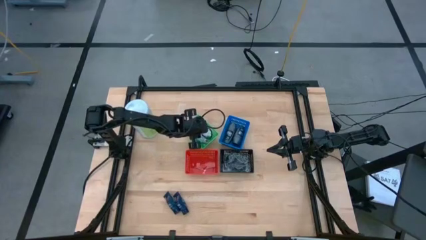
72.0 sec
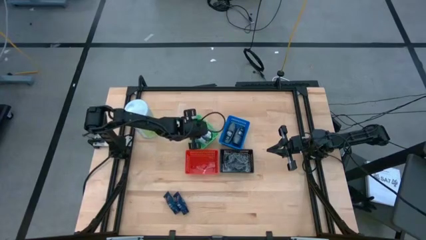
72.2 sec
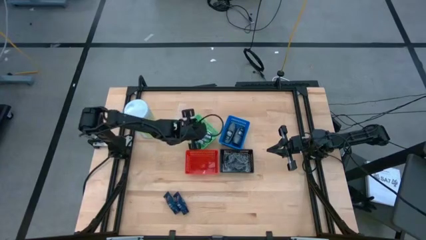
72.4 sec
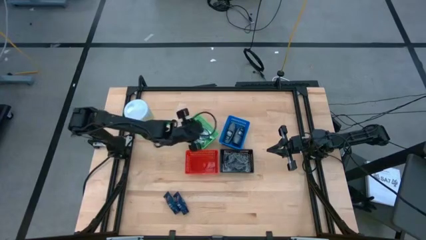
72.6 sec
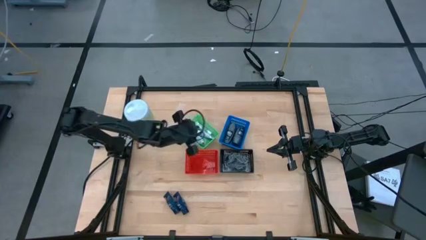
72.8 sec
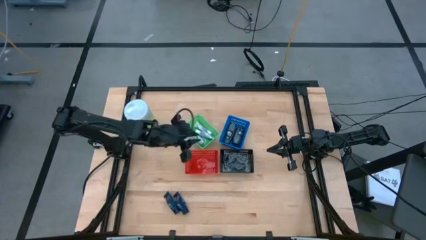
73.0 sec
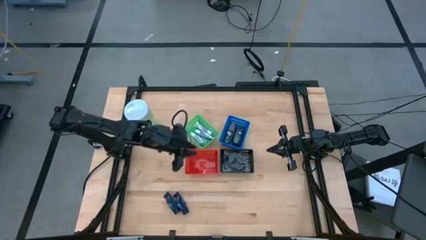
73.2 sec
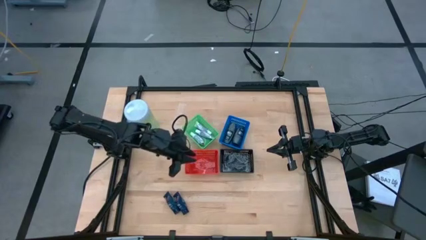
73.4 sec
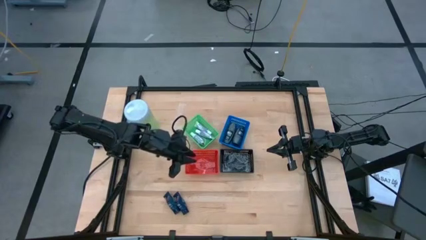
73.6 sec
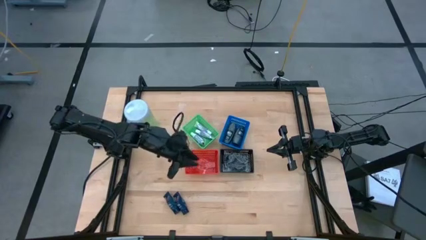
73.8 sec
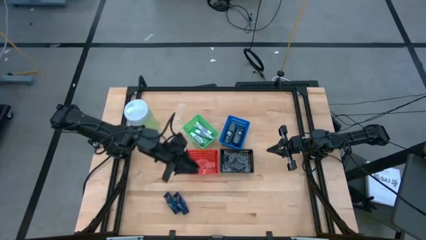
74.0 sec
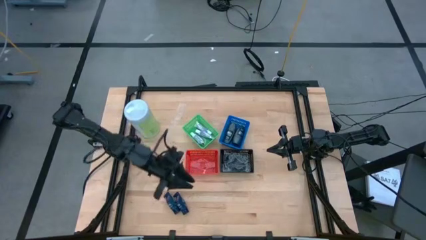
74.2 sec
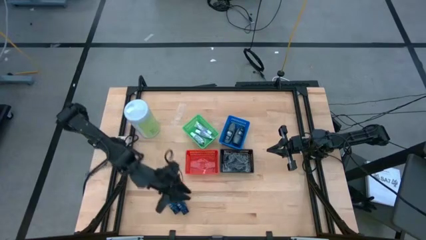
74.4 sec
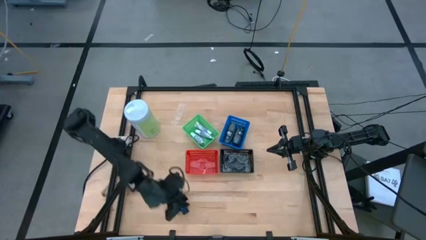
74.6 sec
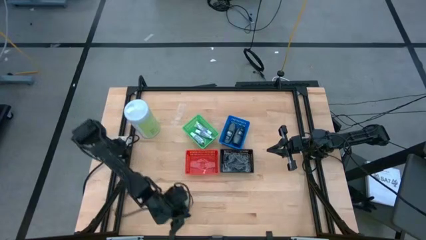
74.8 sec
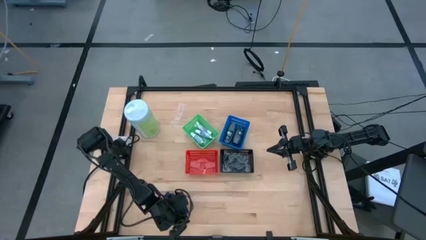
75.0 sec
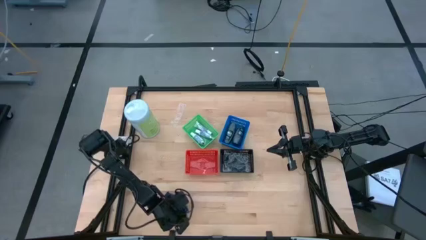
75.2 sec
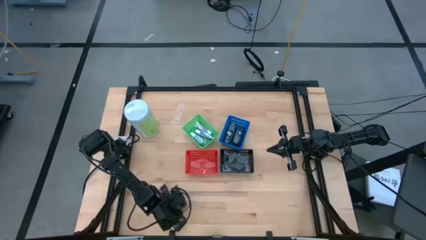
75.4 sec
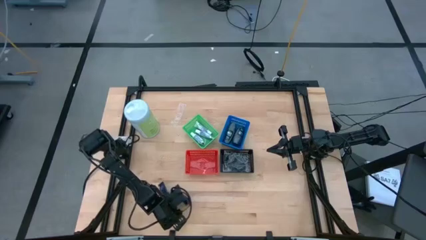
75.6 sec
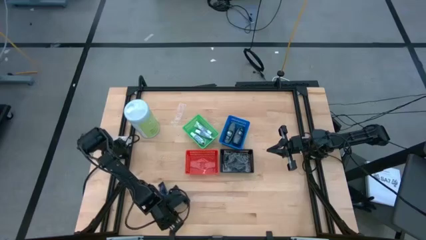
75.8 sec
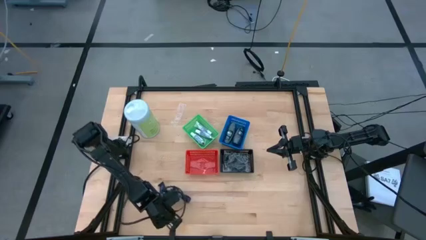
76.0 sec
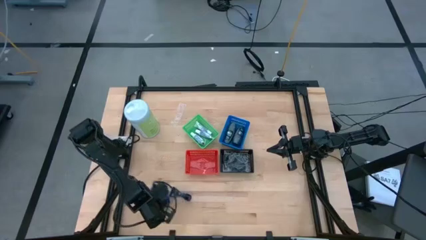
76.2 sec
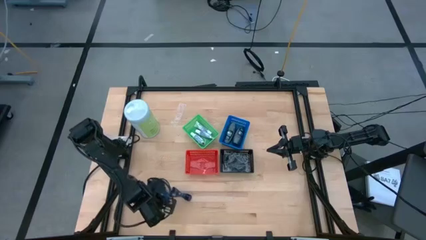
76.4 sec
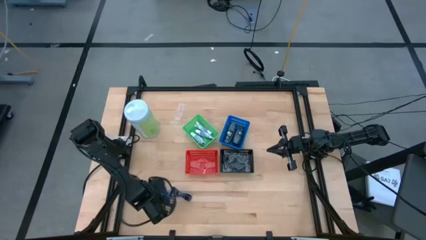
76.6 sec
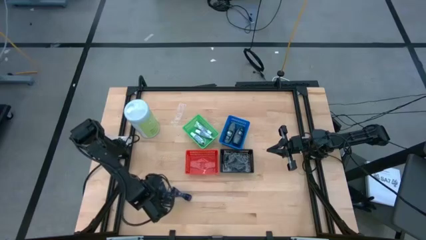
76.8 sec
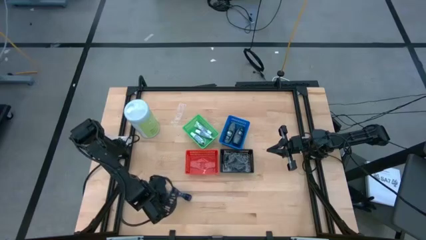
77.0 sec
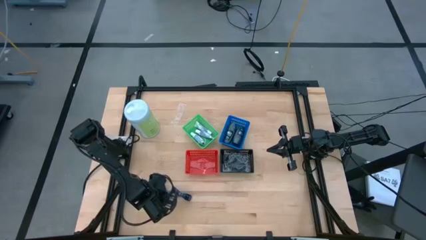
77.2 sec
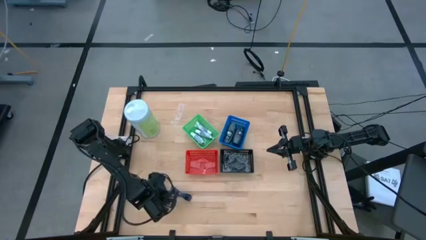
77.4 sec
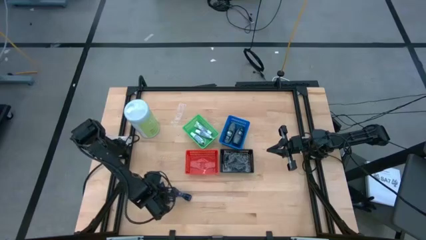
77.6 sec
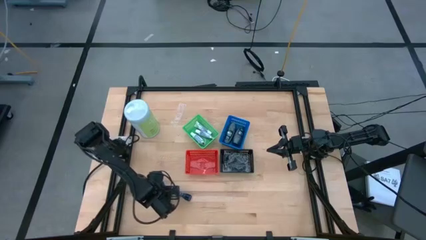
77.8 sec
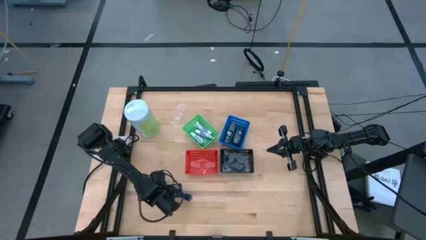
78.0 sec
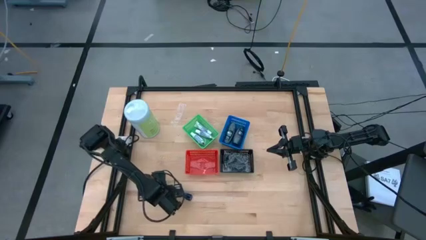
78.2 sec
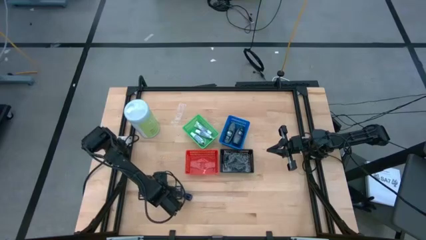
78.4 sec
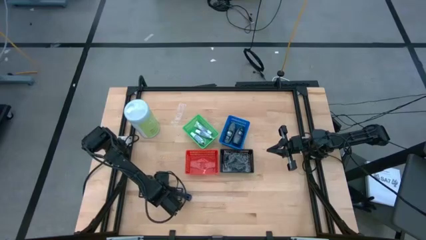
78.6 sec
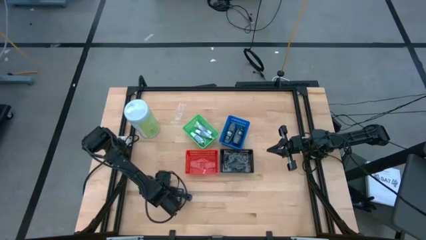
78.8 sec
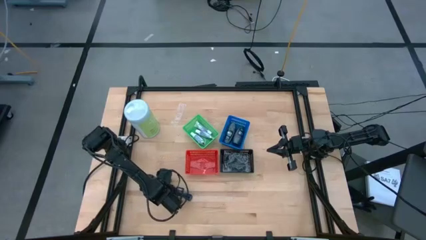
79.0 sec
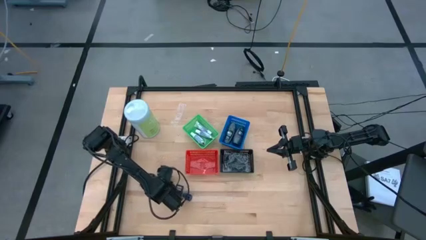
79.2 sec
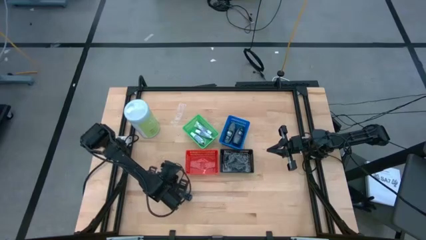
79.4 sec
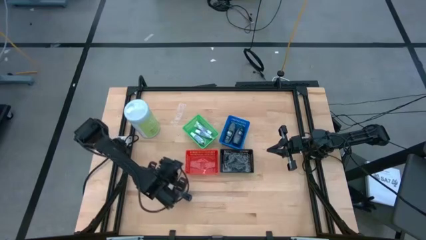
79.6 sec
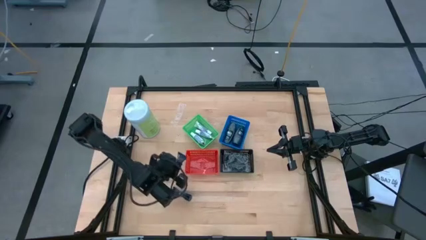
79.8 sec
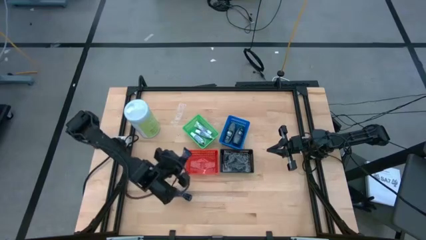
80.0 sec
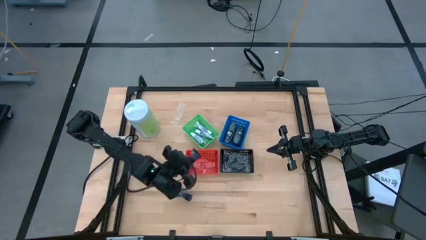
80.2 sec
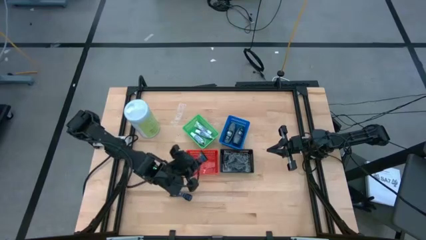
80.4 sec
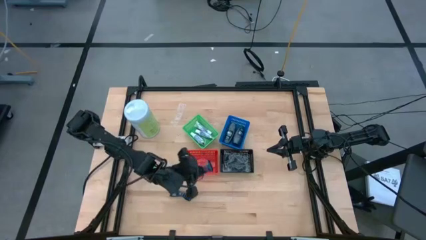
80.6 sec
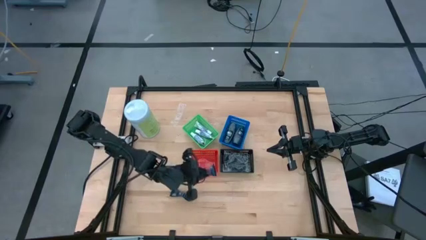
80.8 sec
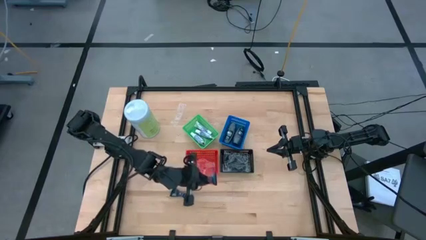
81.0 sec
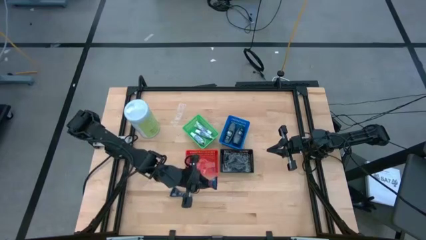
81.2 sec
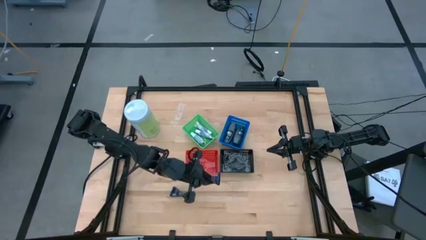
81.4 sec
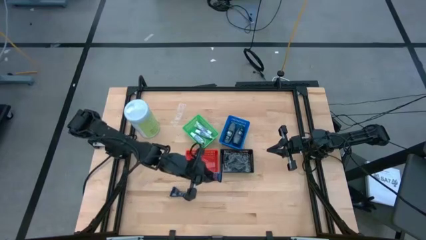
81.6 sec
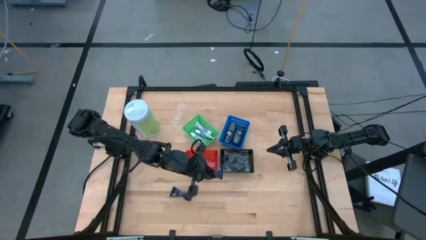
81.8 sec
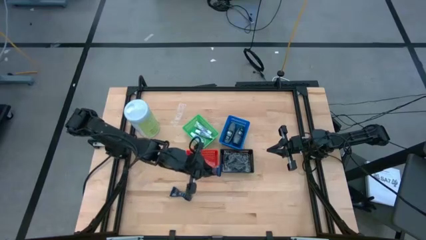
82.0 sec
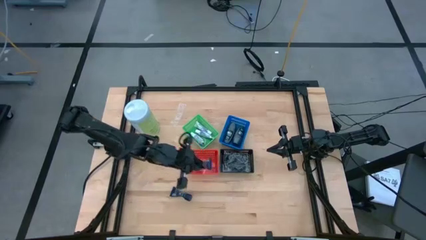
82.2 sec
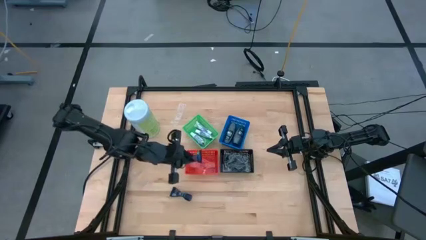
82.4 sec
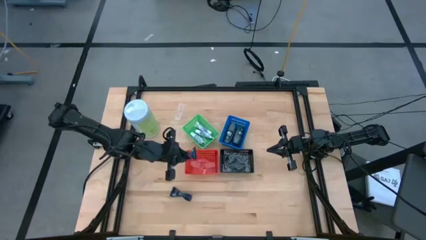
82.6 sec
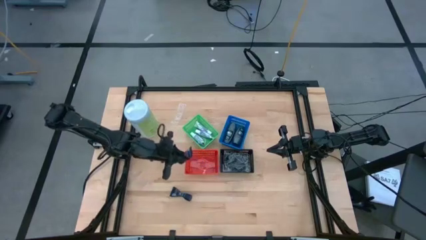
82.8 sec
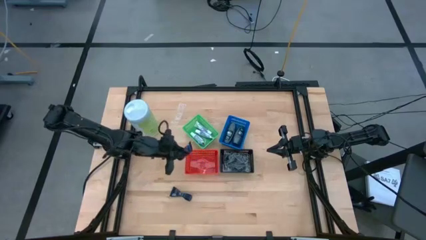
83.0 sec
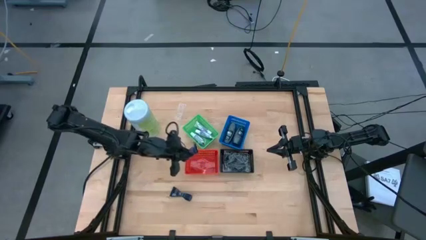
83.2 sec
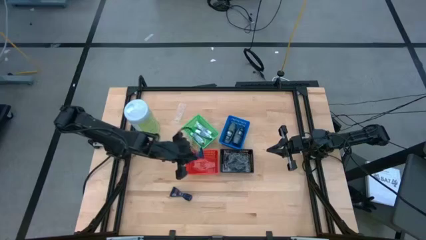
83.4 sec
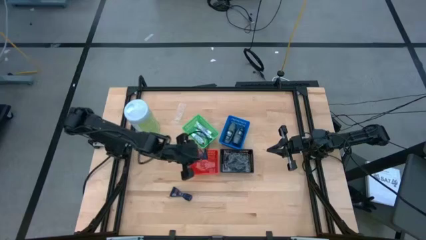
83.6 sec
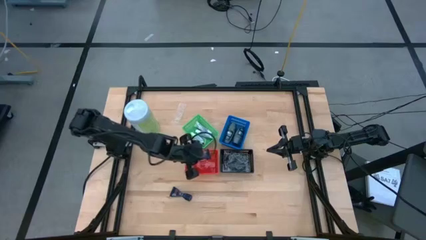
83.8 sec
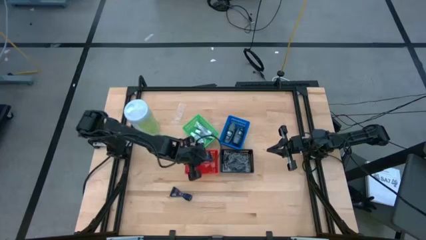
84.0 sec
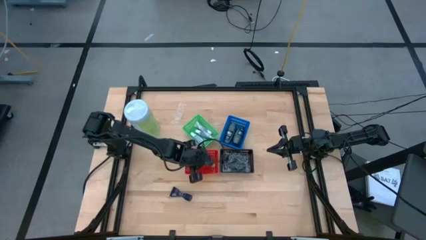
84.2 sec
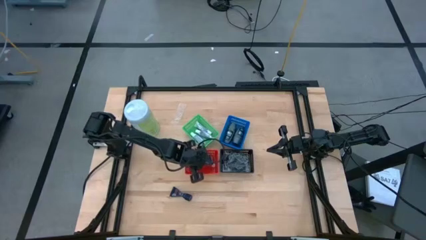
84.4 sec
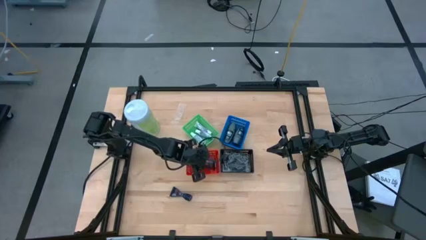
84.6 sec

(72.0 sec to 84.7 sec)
Task: Pick & Place Travel size toiletries
Put the left shave cream into the red bin

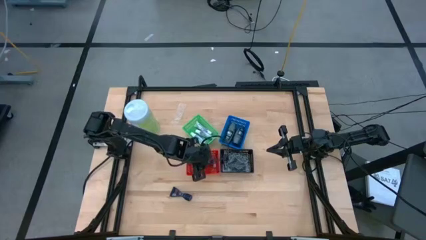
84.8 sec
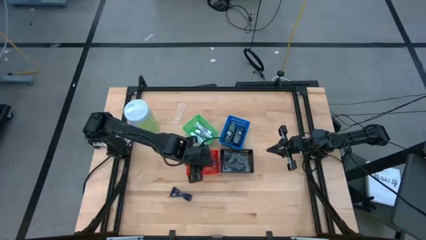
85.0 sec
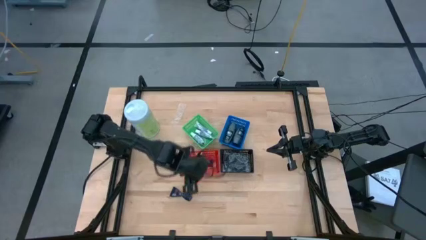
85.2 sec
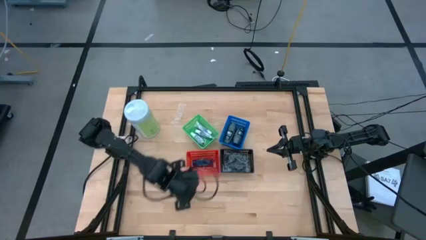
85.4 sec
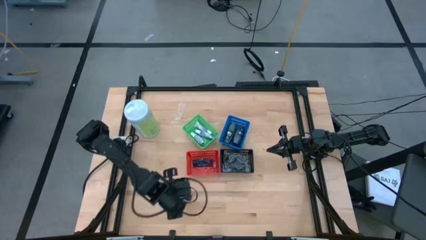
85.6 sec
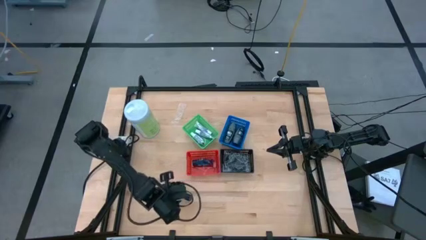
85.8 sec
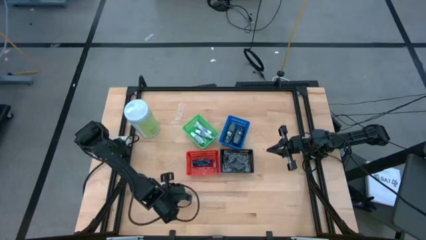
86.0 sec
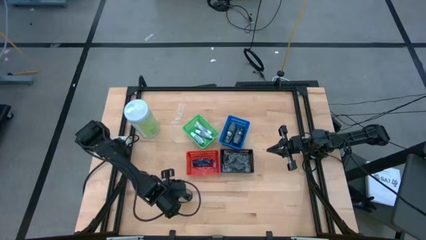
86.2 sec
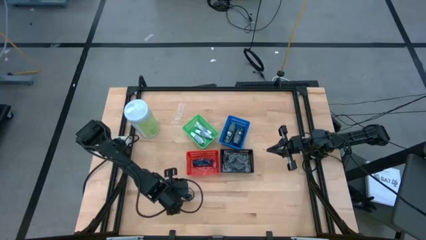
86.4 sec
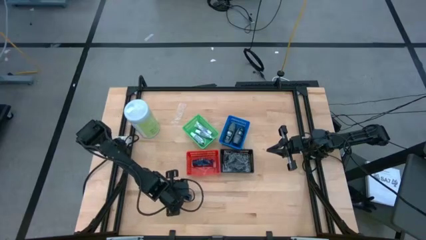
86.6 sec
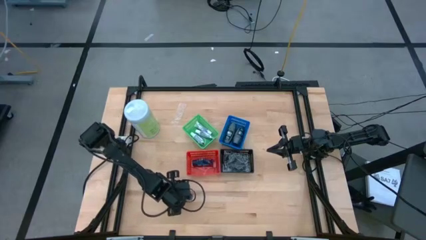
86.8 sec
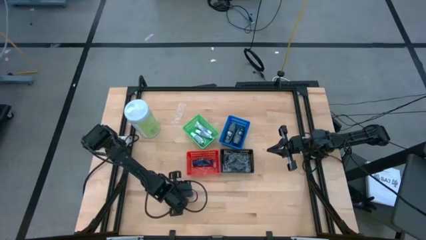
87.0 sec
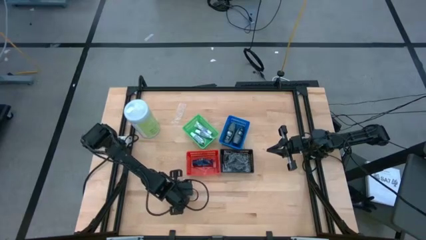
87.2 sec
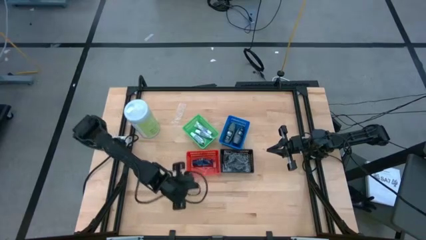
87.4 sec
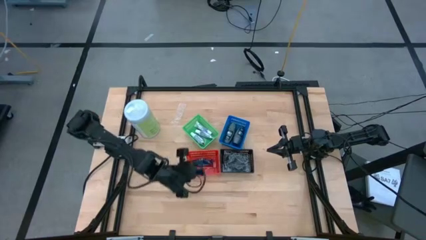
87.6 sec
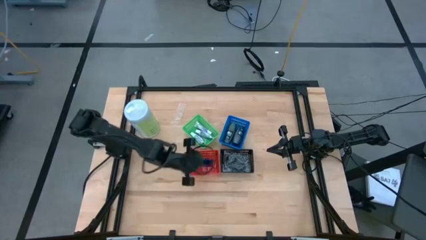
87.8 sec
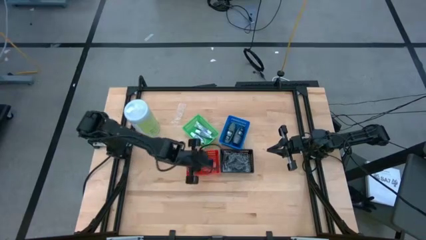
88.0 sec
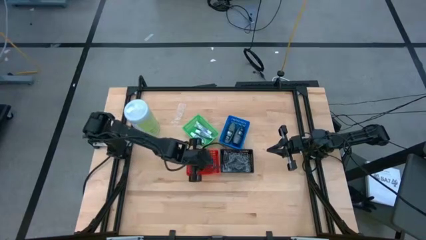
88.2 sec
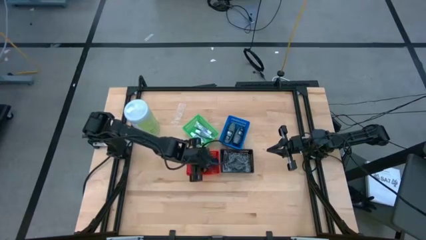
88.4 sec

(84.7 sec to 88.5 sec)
Put the shave cream into the red bin
